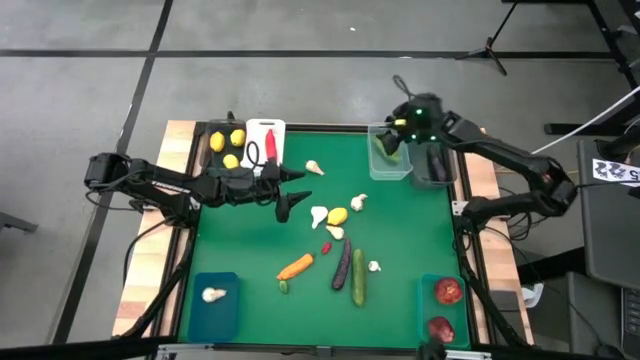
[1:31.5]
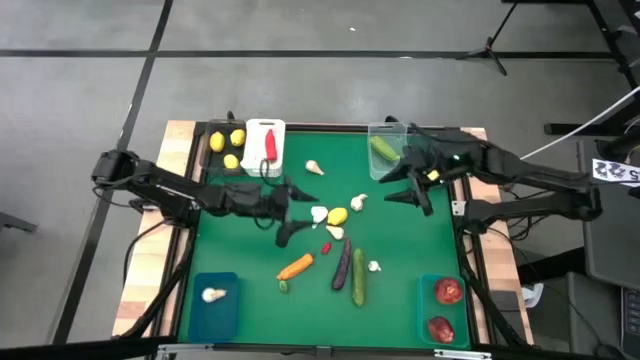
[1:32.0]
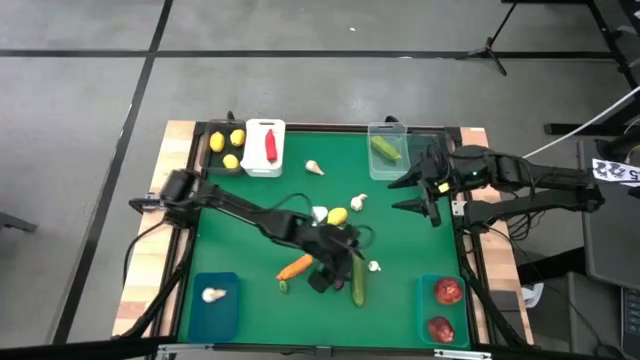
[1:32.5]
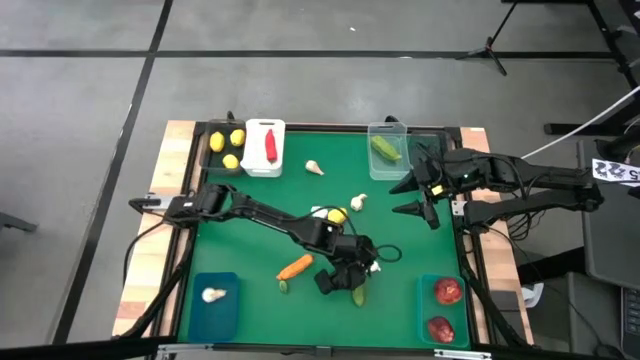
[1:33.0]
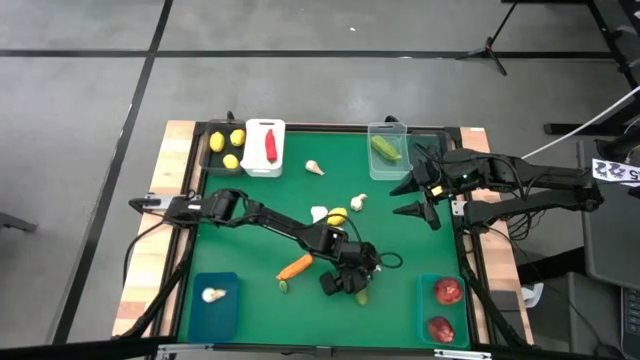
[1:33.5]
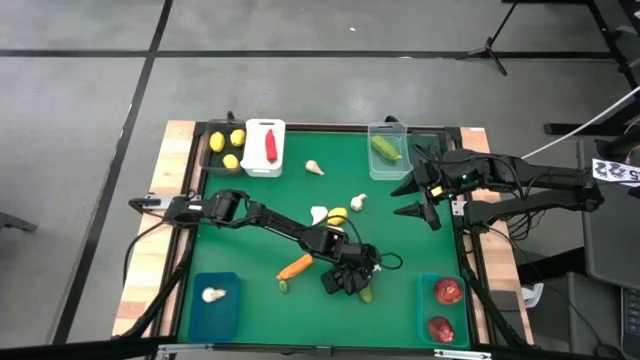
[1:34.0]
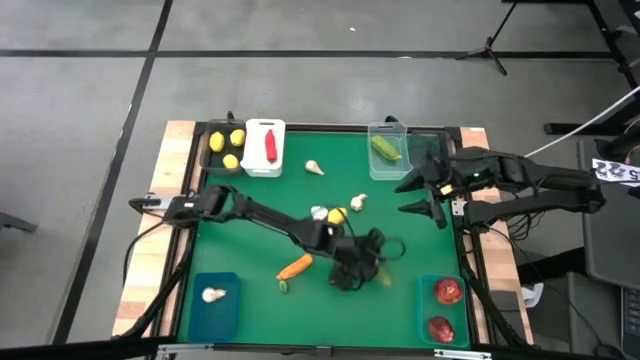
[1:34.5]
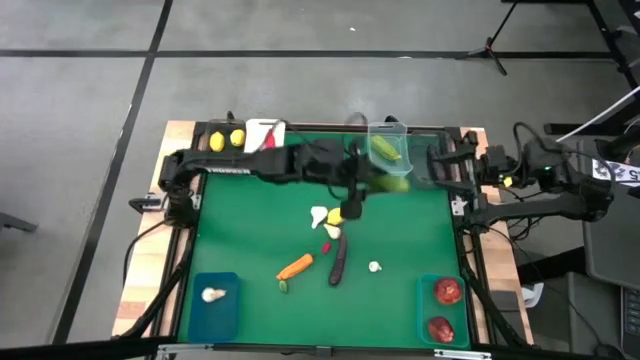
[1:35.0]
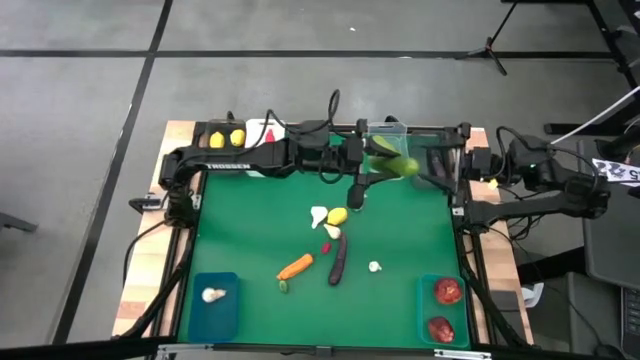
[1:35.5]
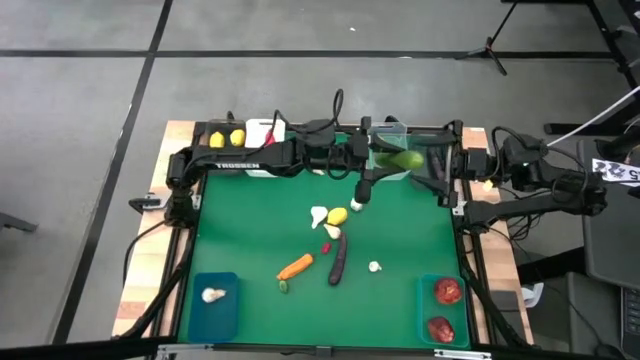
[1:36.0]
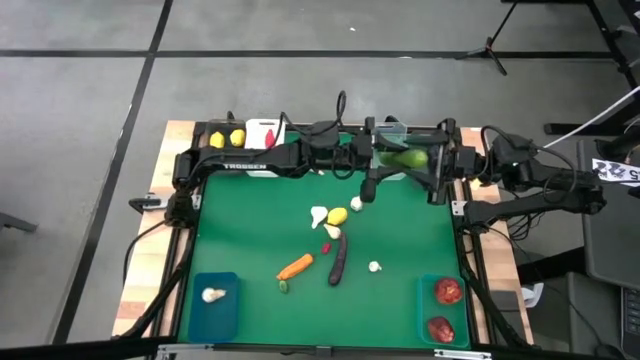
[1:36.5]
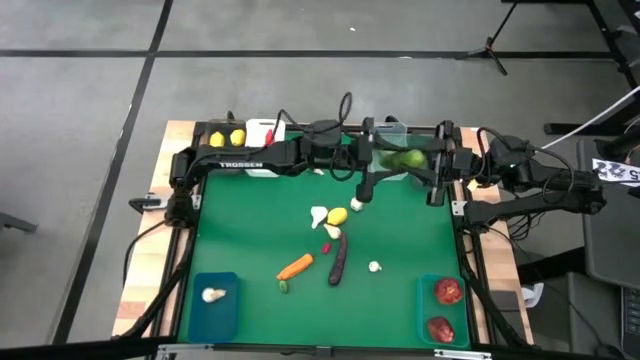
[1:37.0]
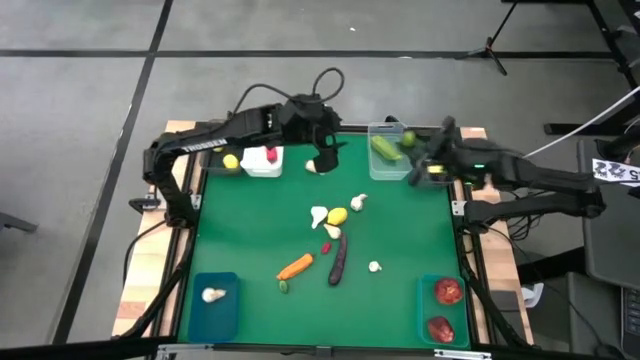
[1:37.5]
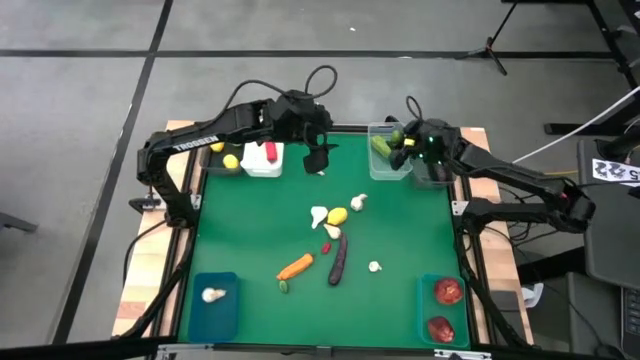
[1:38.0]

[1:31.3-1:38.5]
Task: Sort produce into baskets
Put the cucumber into the transparent bin

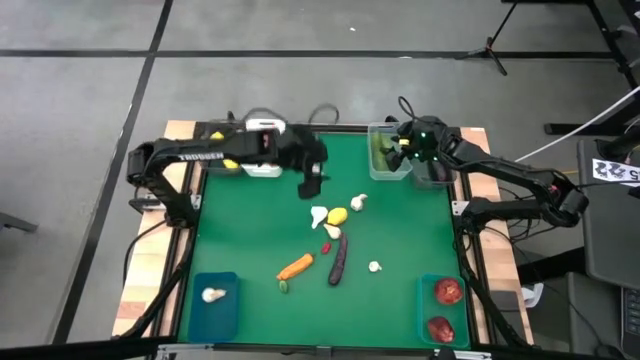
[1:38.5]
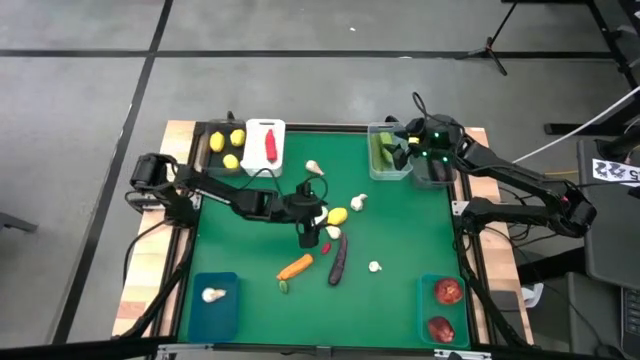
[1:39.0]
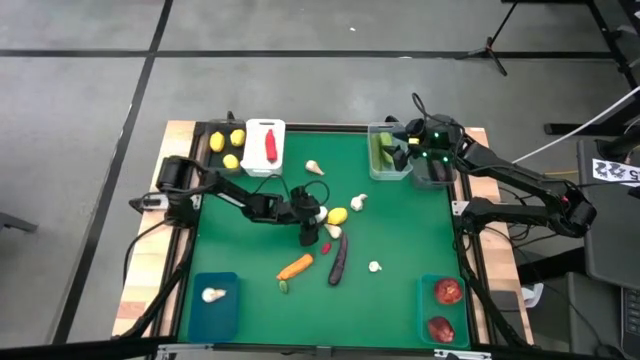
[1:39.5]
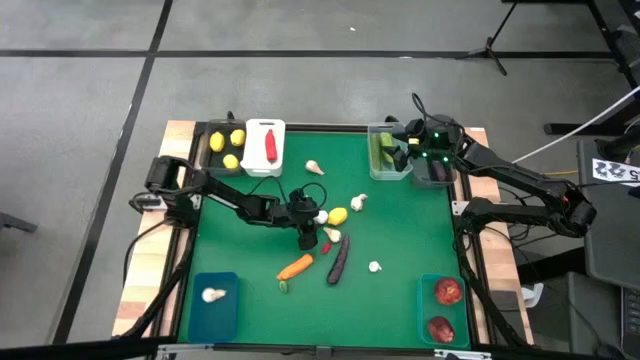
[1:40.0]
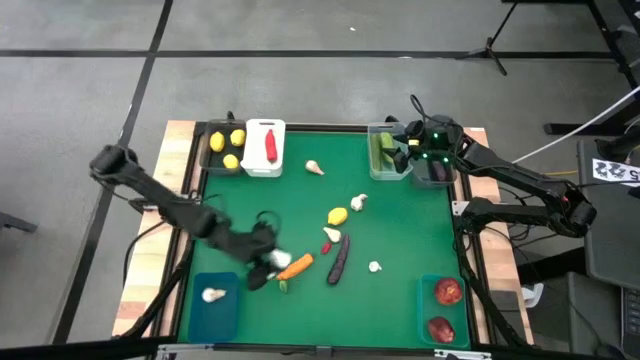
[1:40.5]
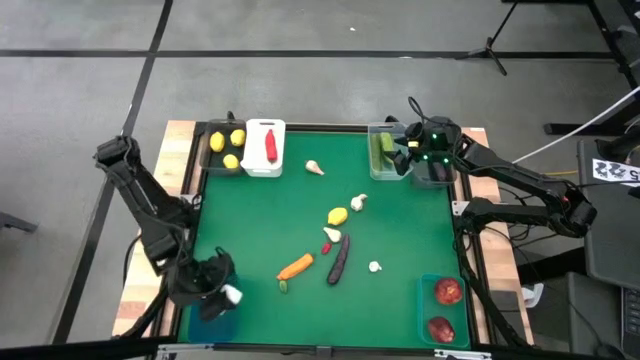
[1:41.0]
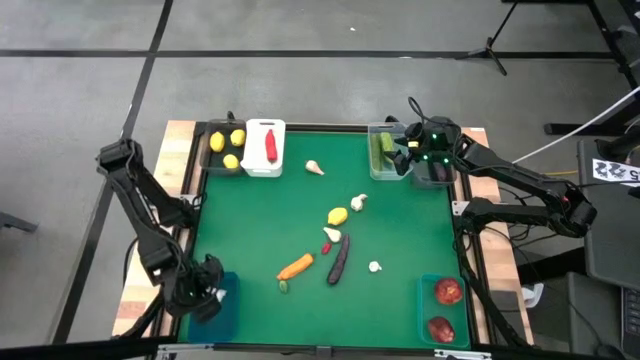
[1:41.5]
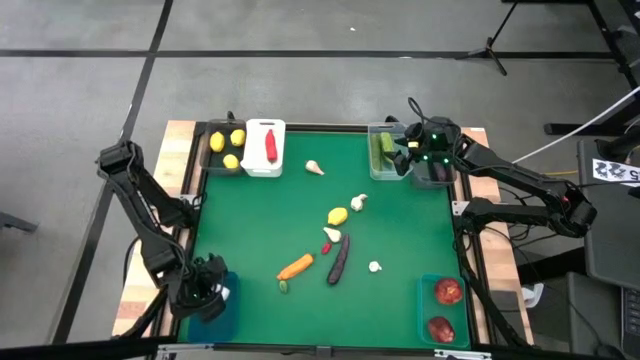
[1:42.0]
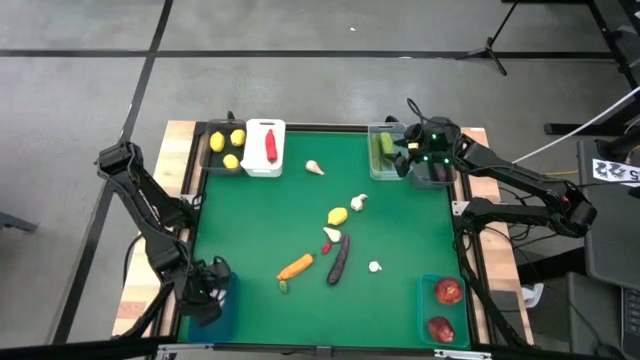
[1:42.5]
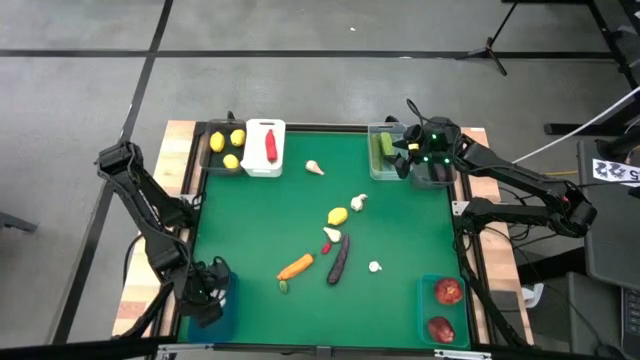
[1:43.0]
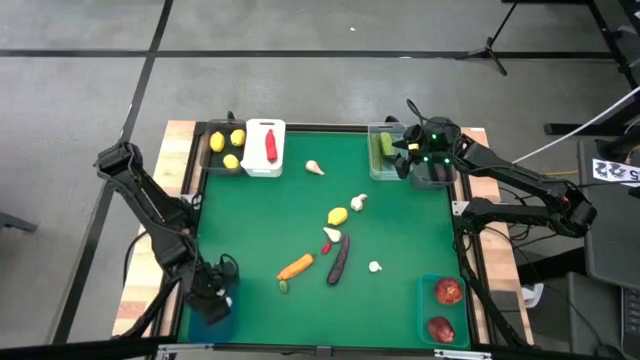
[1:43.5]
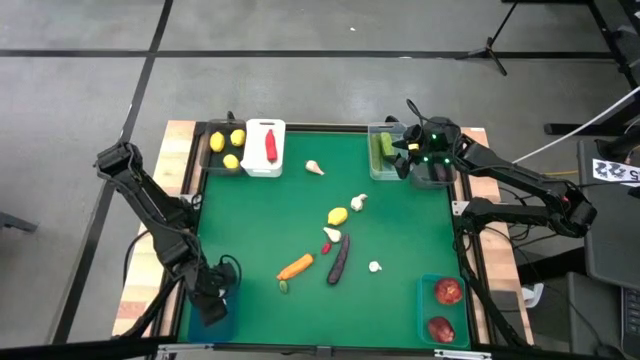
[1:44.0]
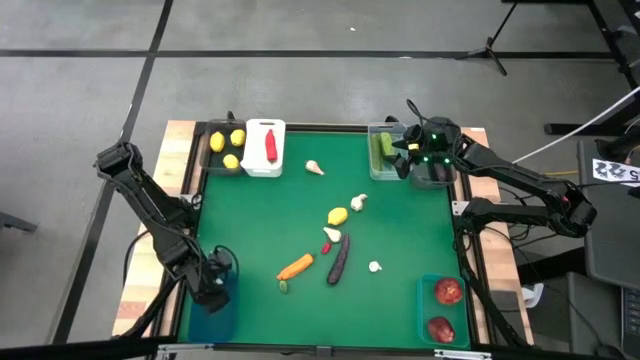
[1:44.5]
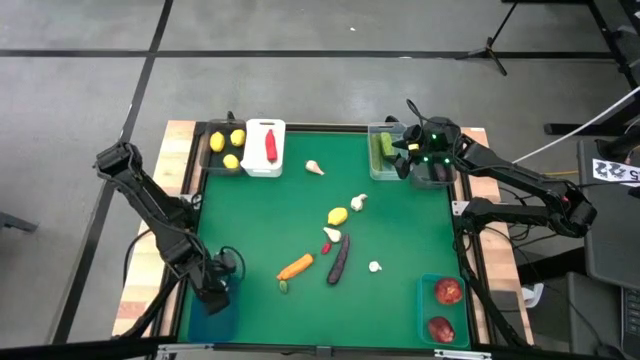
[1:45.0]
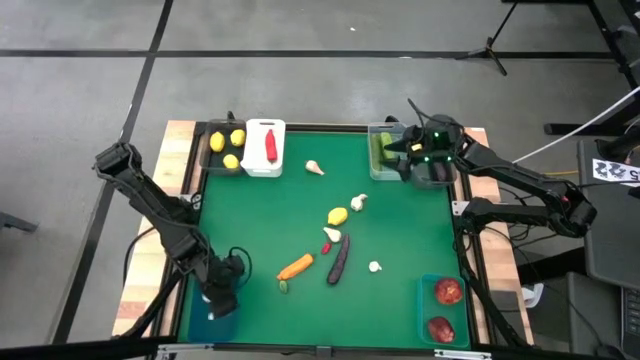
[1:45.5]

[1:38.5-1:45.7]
Put the garlic into the blue bin

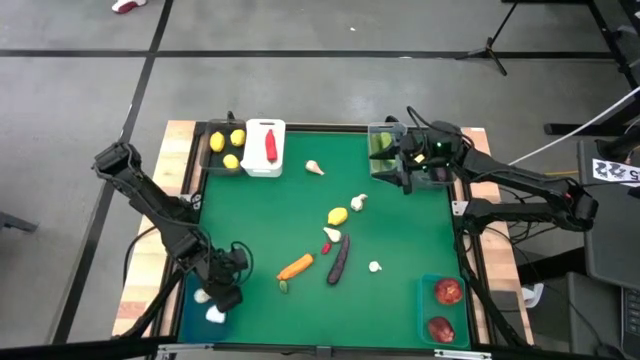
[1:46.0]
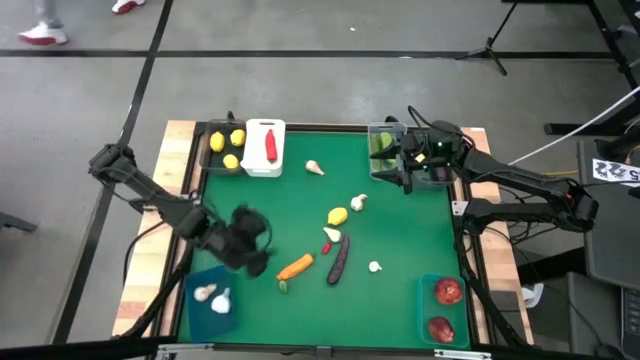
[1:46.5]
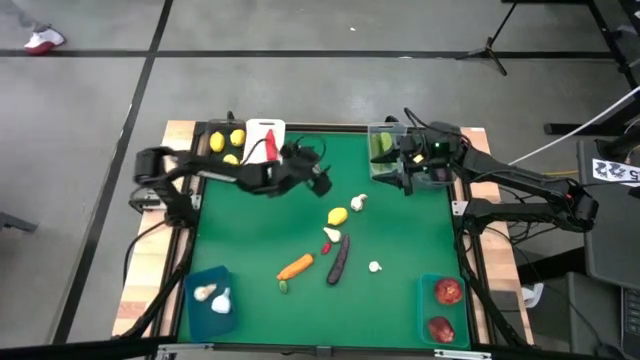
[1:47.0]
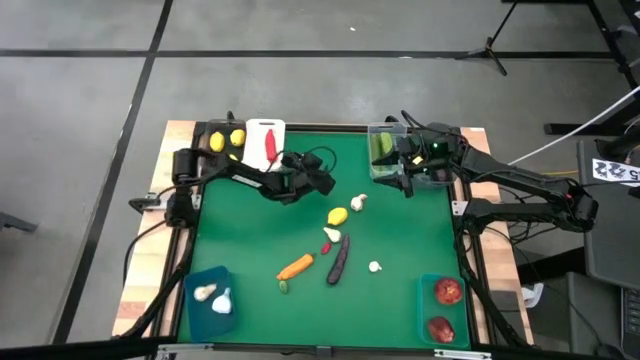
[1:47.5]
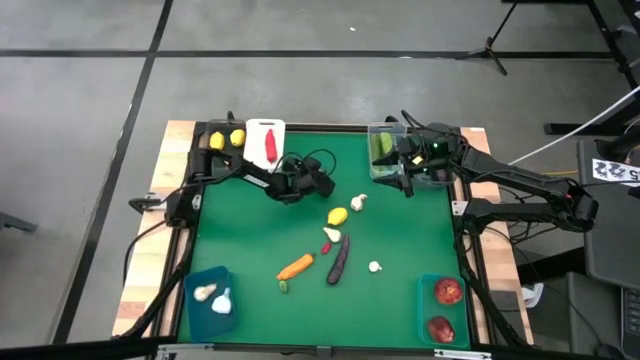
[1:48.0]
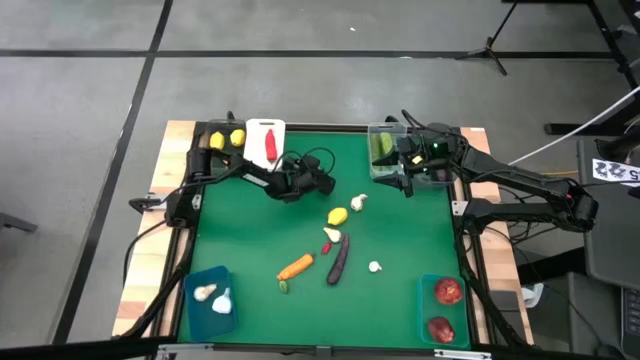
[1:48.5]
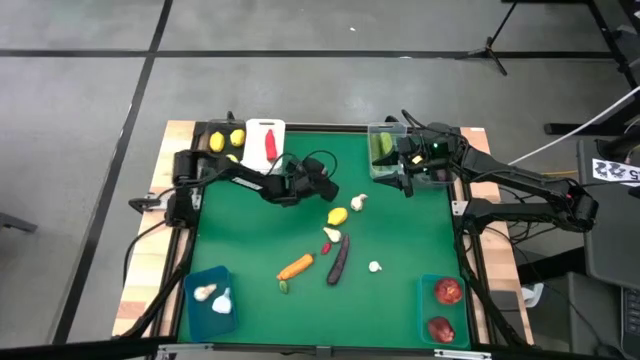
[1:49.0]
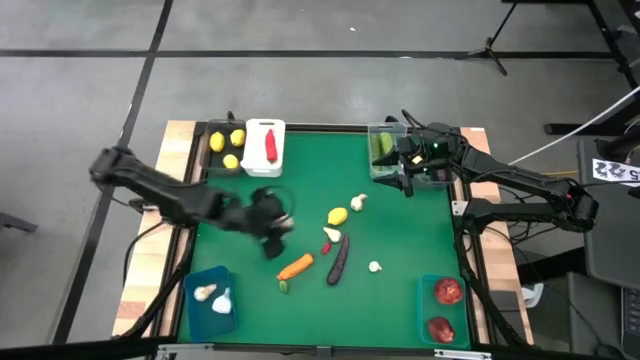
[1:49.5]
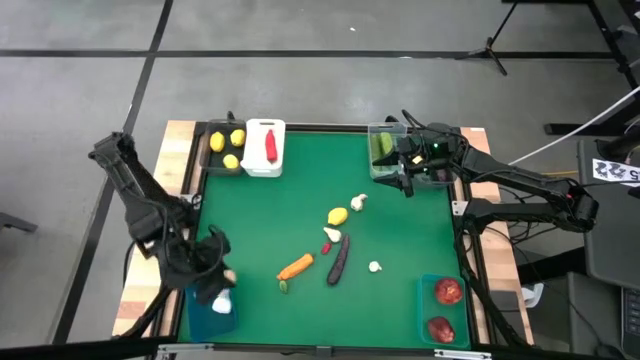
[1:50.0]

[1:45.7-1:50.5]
Put the garlic into the blue bin

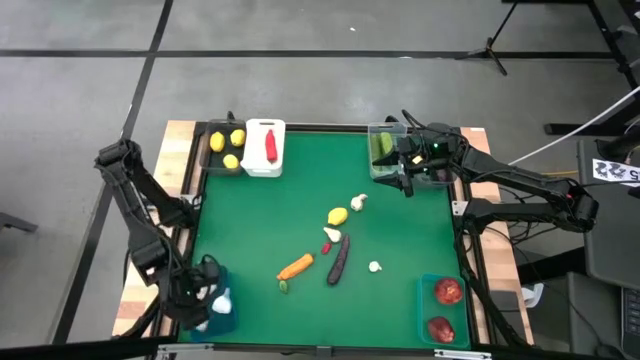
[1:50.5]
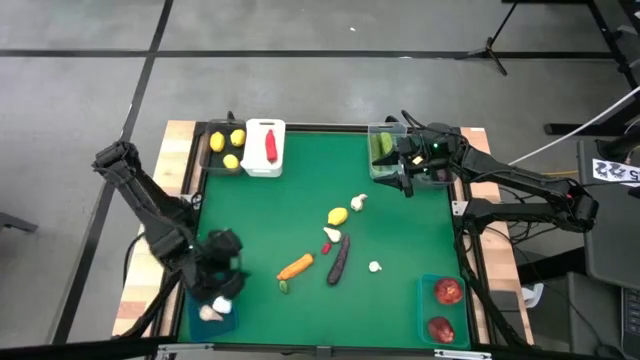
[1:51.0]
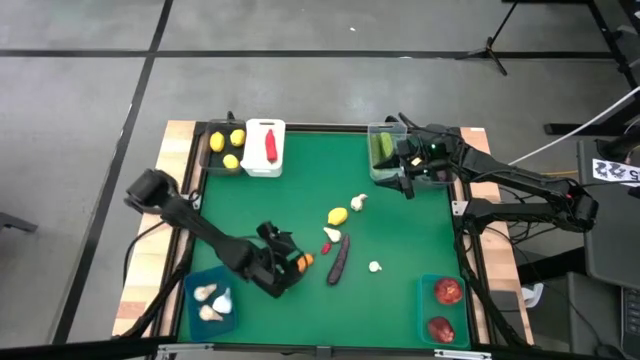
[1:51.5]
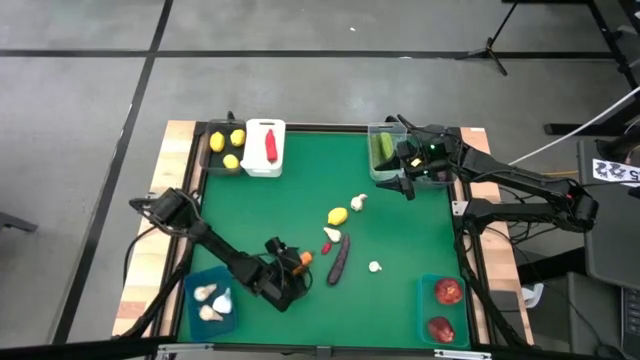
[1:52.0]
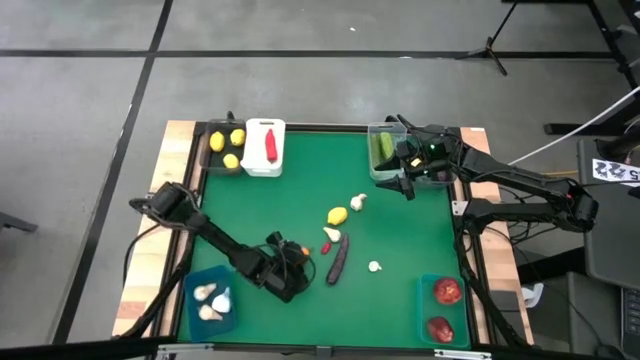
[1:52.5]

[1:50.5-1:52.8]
Put the orange chili pepper into the white bin
